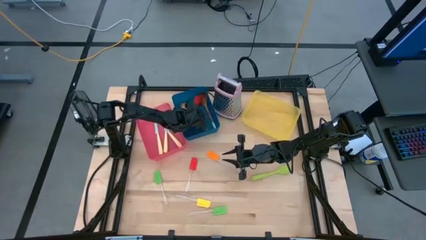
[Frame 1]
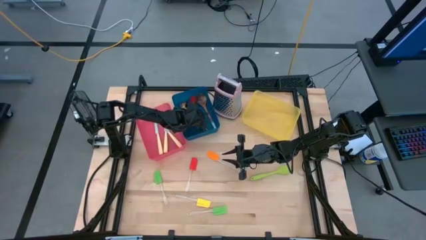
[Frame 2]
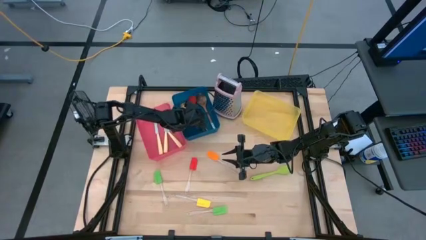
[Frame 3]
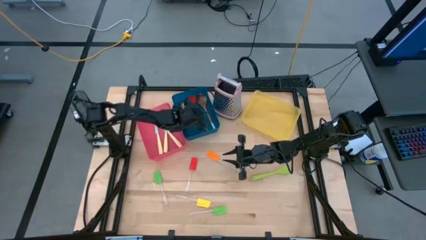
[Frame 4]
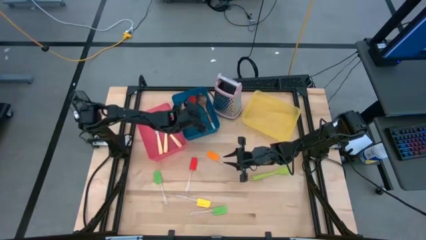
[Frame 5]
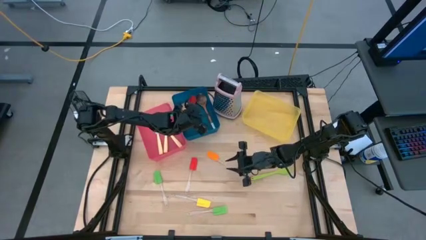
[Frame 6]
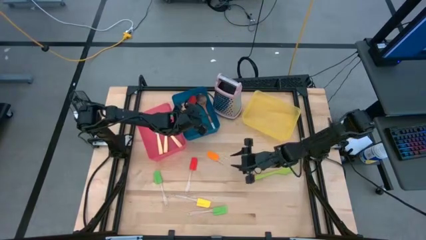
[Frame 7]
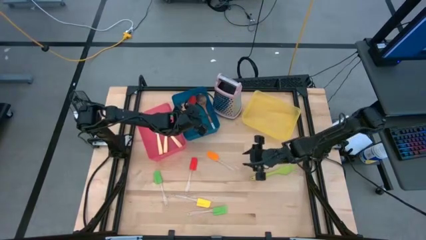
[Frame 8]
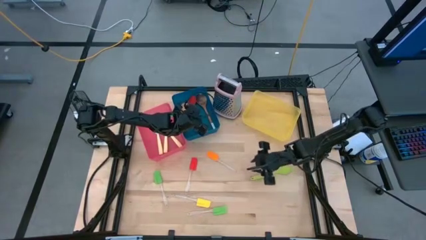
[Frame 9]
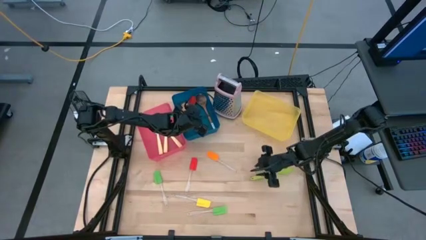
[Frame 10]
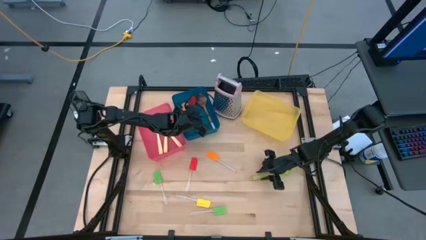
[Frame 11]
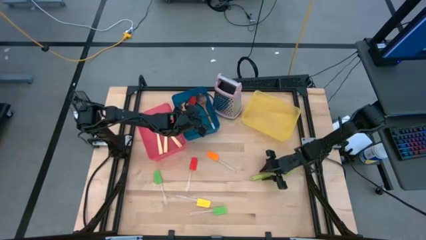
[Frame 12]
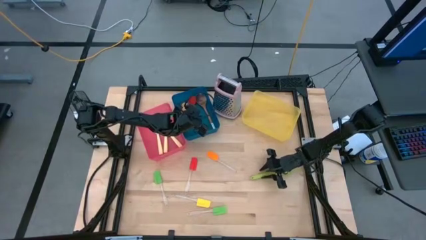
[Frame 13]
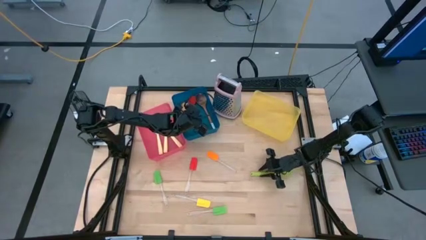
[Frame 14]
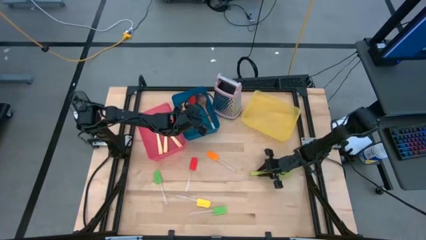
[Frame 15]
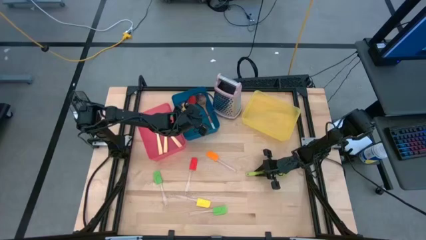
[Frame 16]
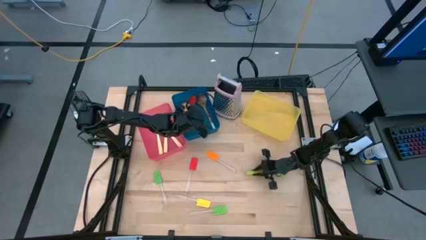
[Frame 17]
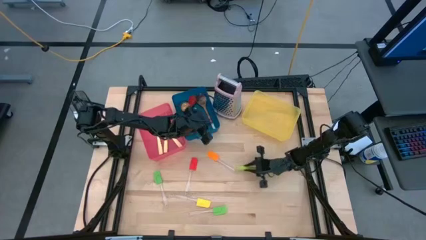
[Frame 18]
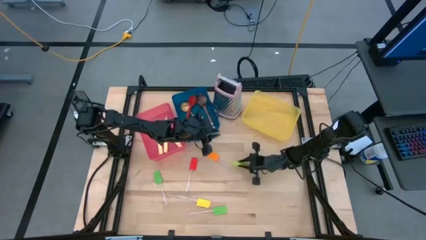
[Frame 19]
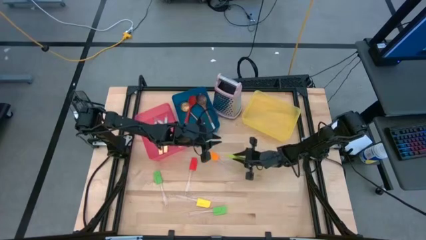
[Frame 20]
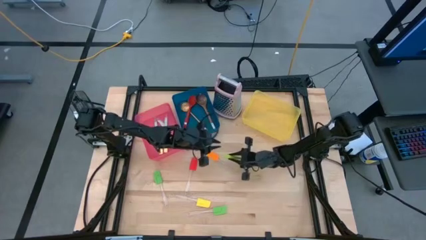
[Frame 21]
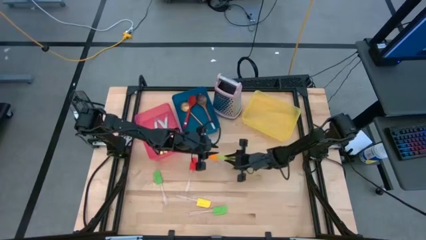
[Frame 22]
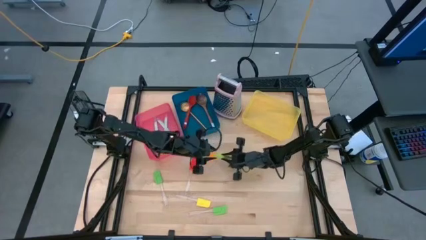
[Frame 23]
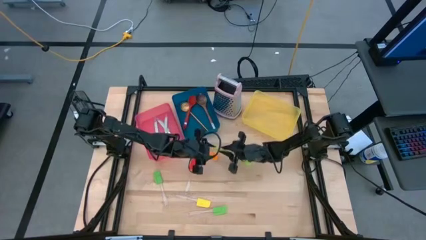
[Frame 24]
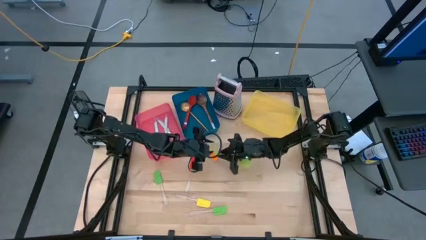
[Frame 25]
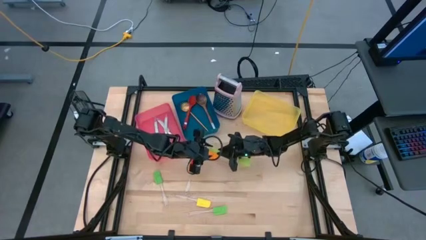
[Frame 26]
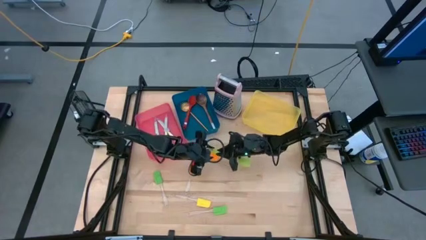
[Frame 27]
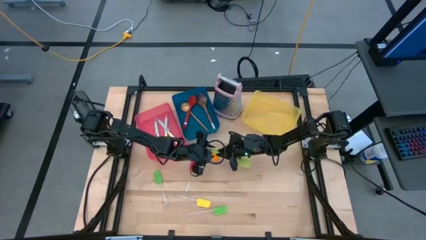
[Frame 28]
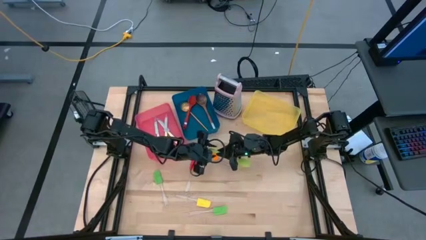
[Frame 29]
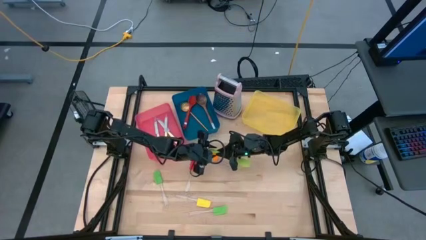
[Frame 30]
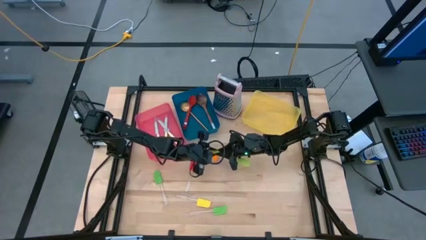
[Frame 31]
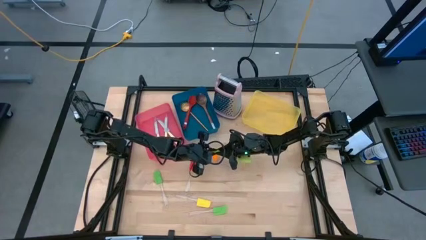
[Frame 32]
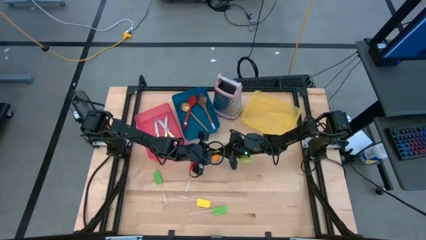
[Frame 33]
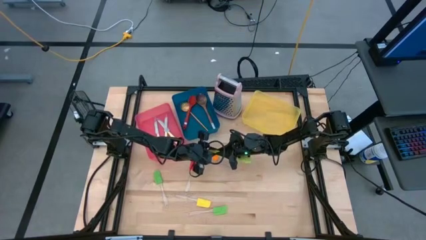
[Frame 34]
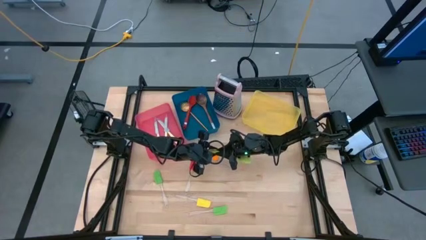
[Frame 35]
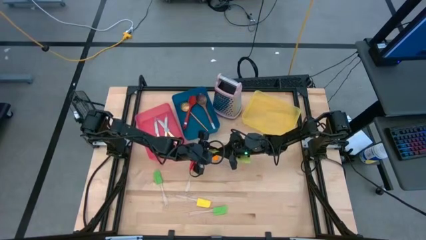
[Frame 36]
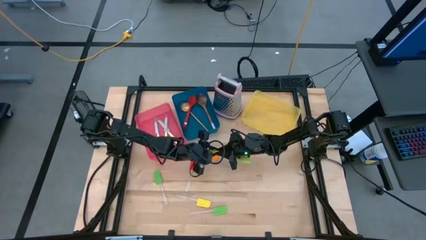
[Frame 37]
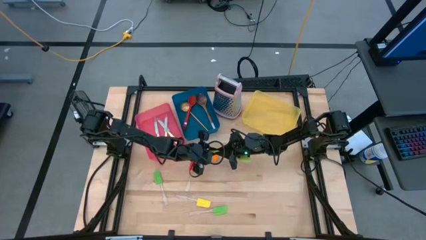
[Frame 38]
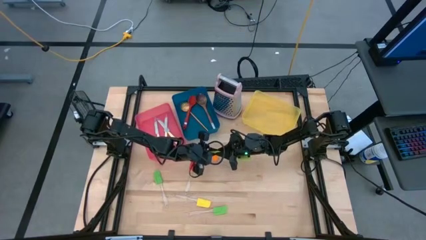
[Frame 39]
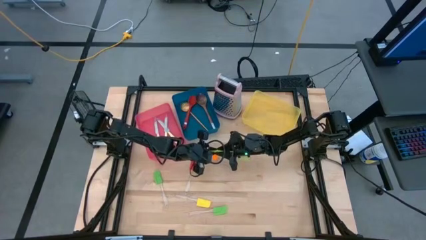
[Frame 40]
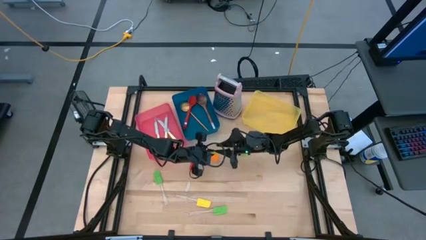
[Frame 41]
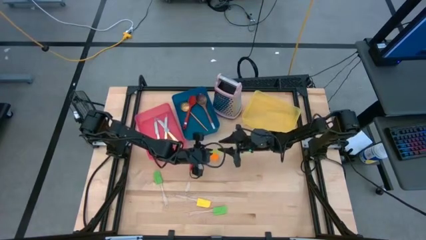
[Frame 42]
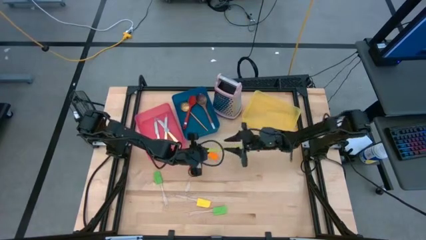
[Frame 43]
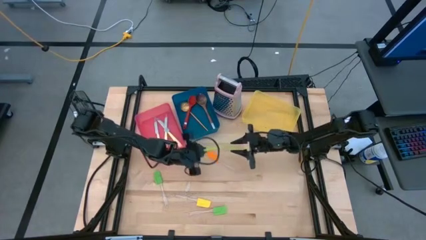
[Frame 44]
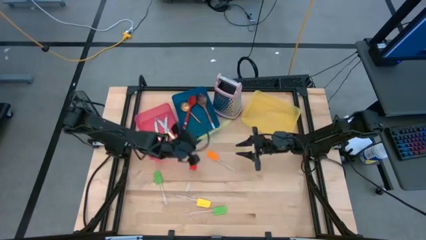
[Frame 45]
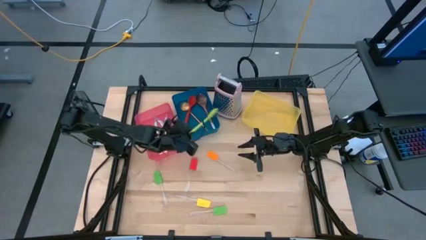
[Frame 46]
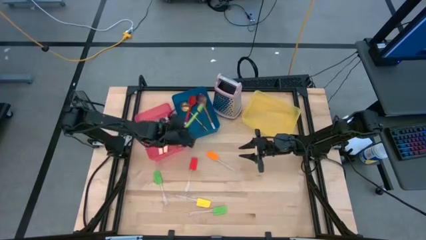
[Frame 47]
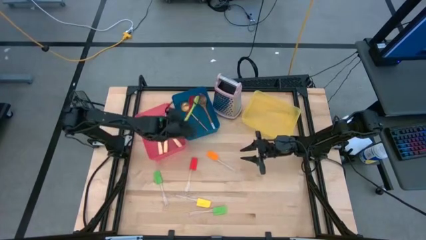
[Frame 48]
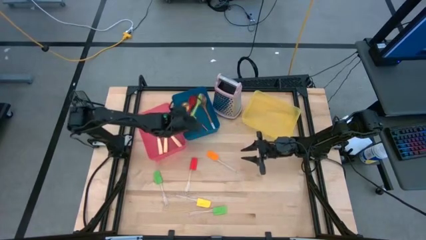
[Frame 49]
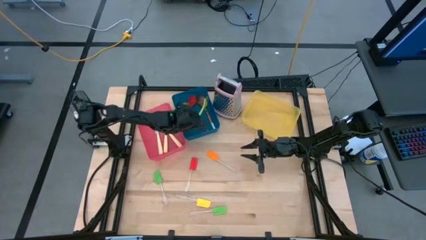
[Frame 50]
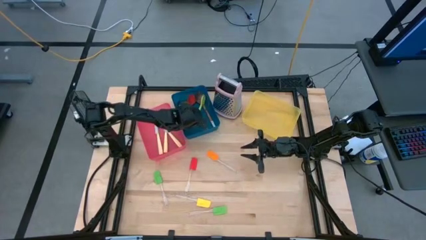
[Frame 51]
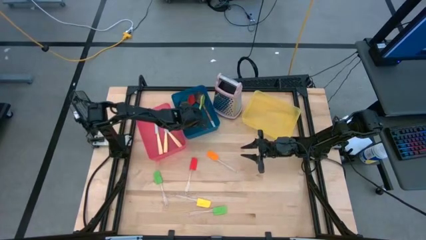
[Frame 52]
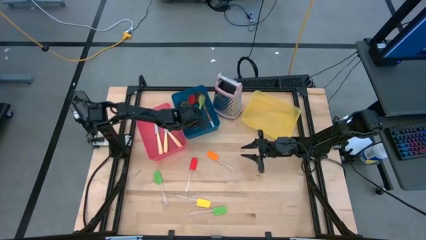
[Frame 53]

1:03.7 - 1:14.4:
Task: Pick & Place Kitchen Items
Put the green spoon into the blue bin

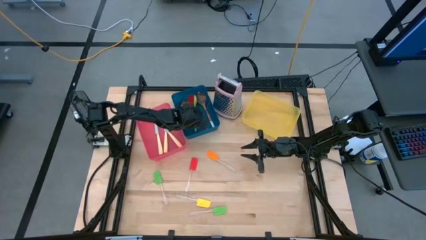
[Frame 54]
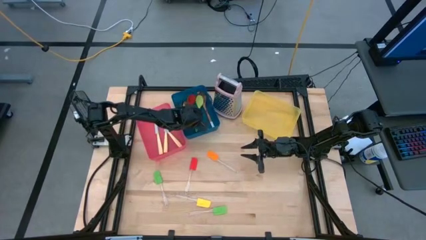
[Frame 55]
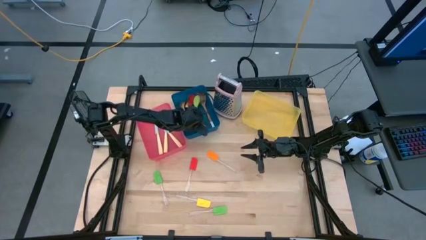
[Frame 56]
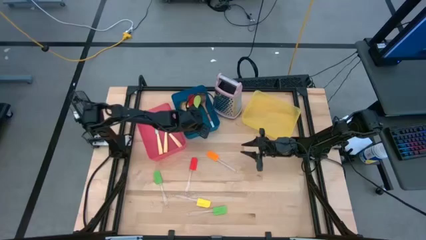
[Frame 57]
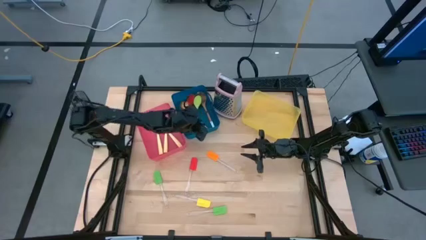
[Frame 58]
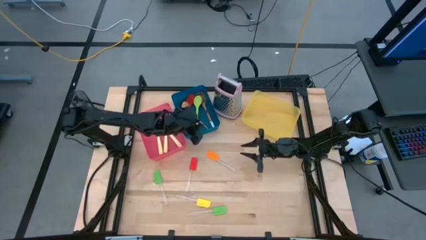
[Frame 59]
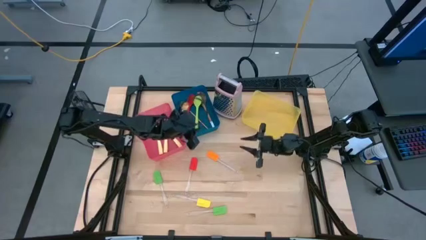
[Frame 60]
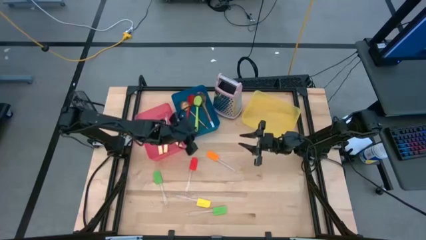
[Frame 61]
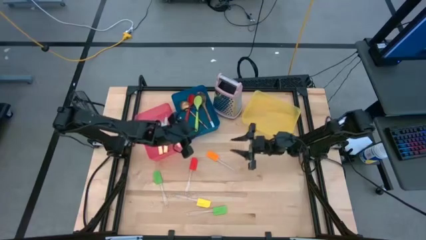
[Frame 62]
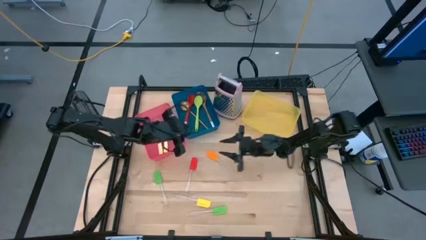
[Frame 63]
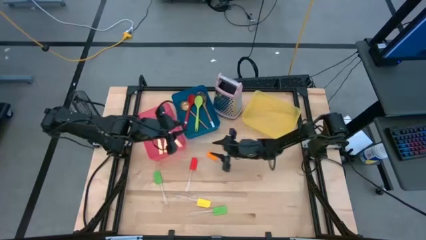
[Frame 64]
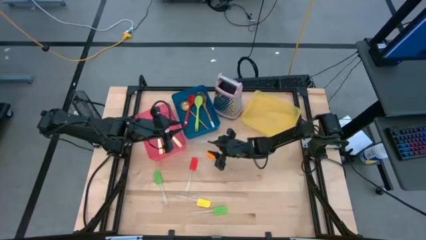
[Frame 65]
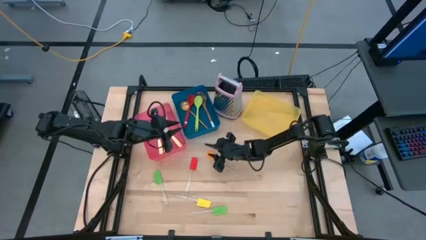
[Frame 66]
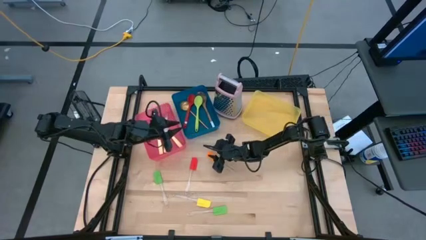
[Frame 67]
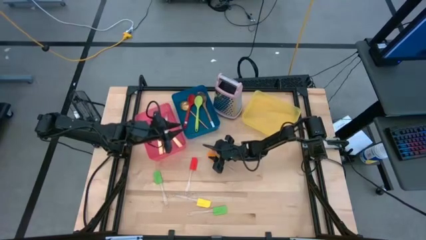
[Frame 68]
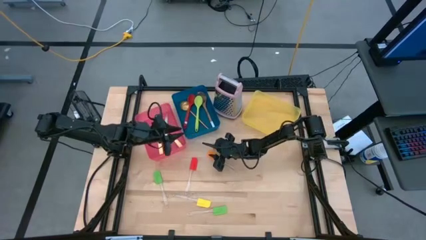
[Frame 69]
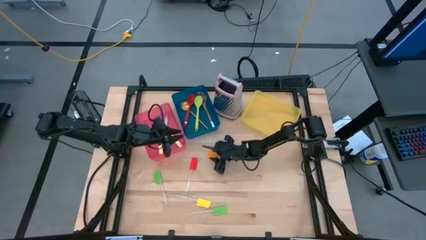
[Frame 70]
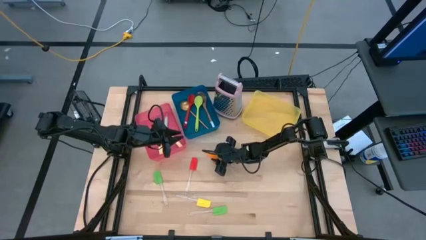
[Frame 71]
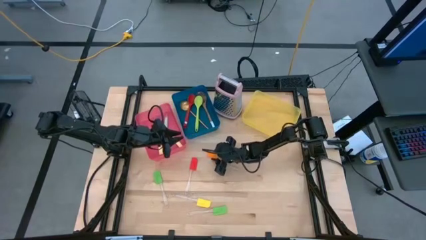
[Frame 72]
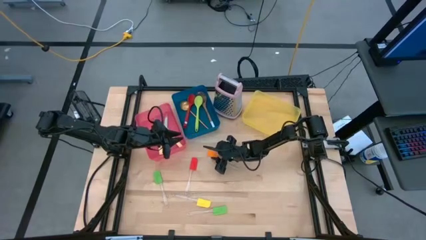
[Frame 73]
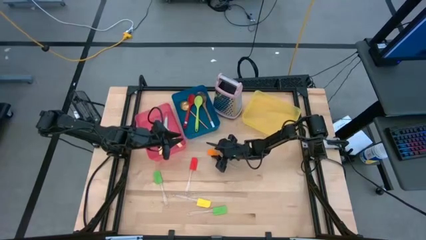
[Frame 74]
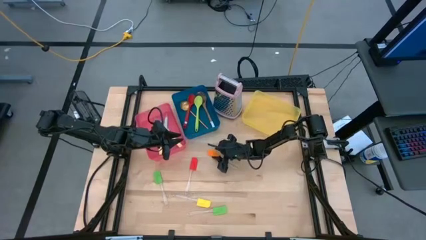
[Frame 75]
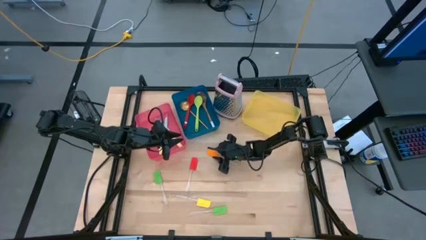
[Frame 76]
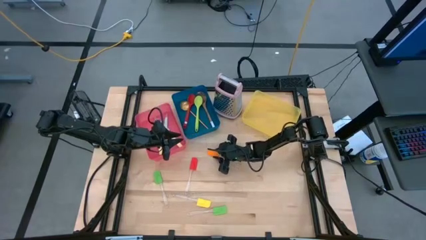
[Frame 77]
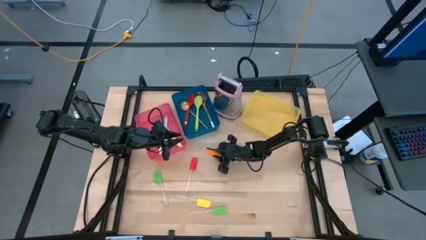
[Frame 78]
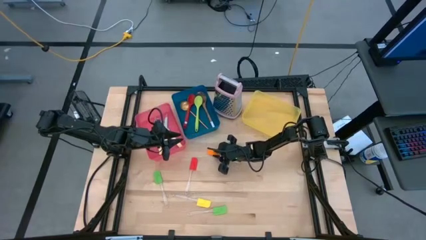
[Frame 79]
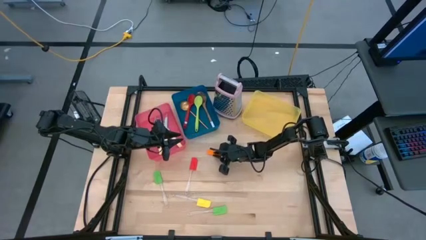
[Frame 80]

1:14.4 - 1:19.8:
Put the orange spatula into the yellow bin
